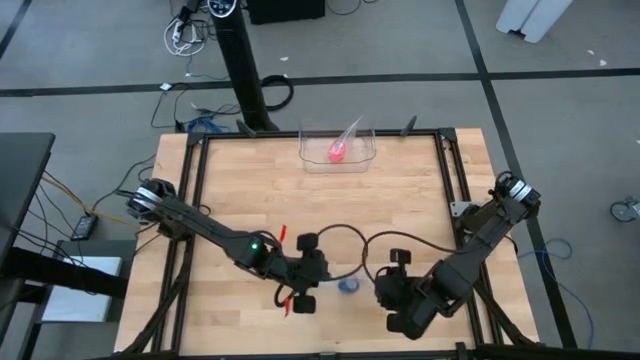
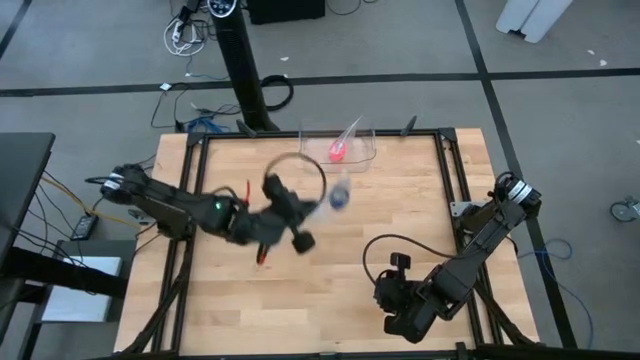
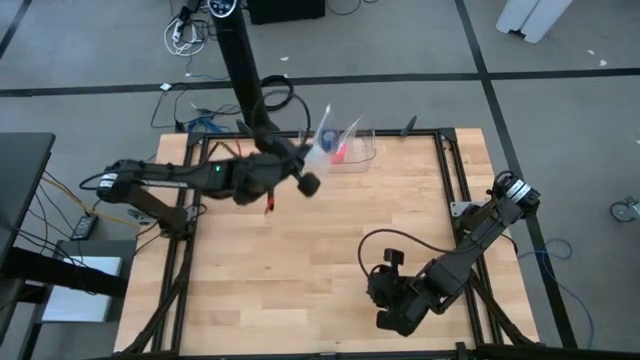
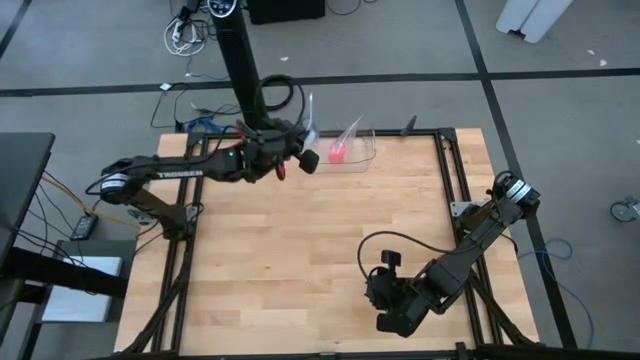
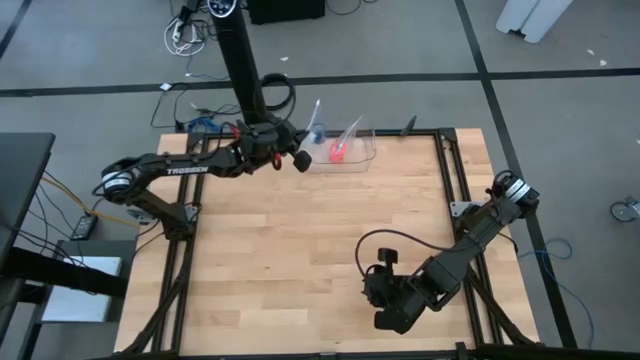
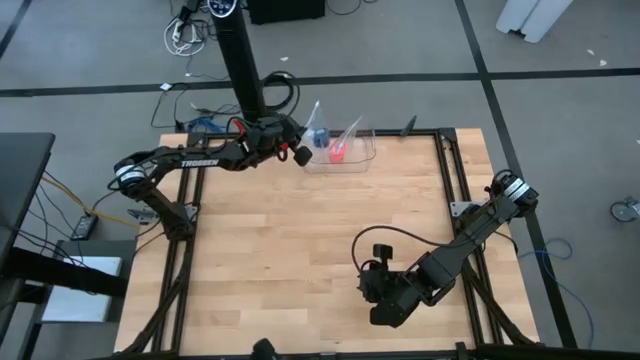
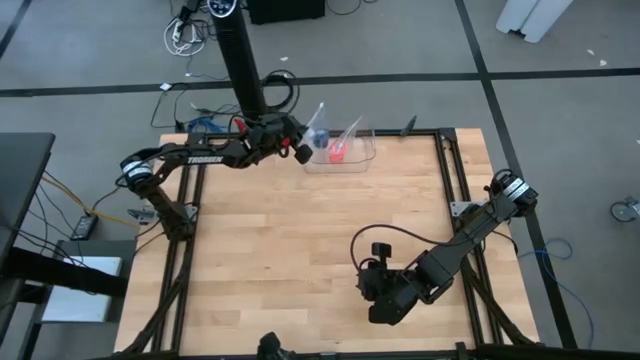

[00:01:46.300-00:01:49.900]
Task: Roll bandage
Put the transparent zip bag into the transparent bin

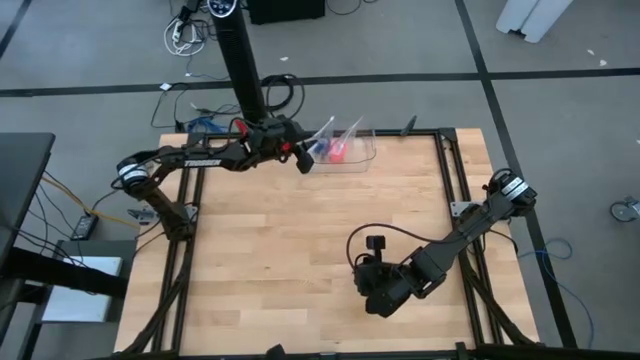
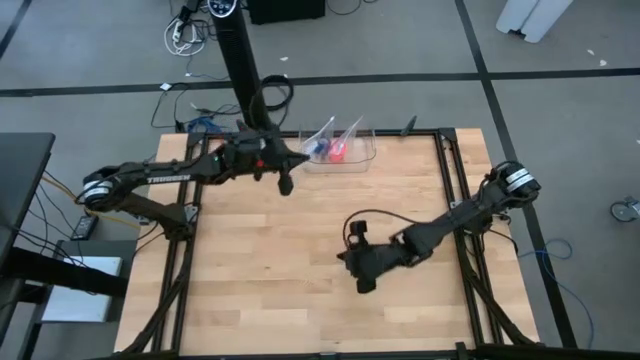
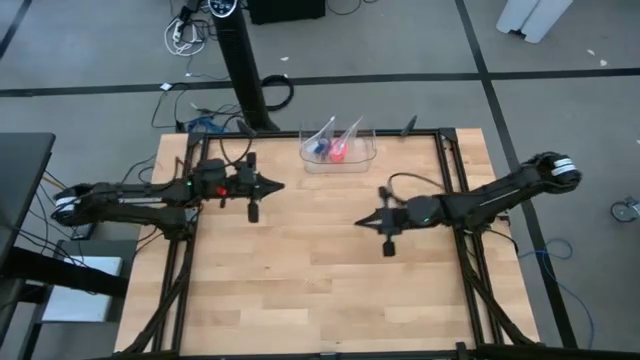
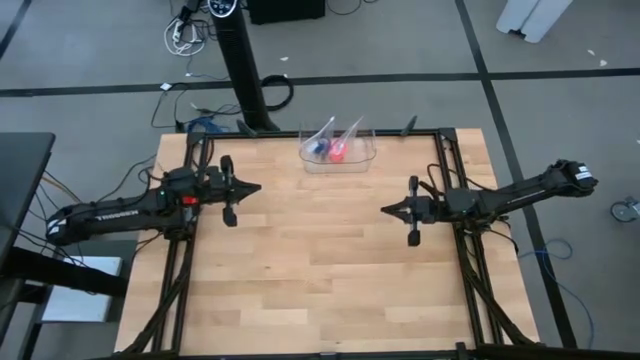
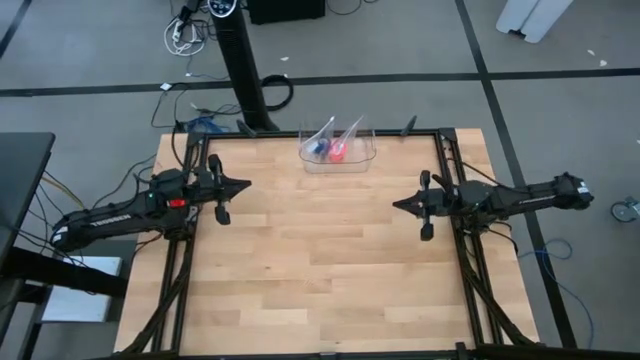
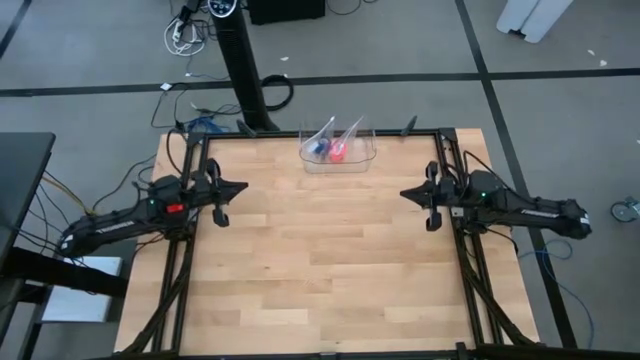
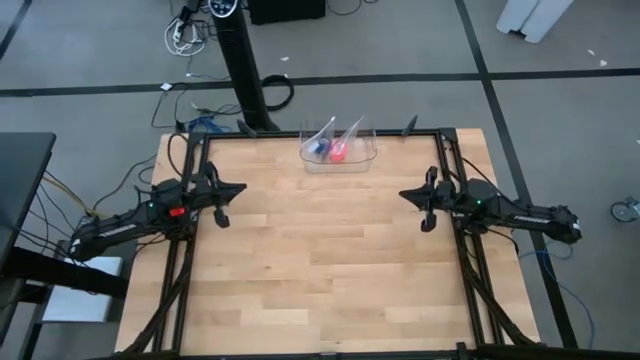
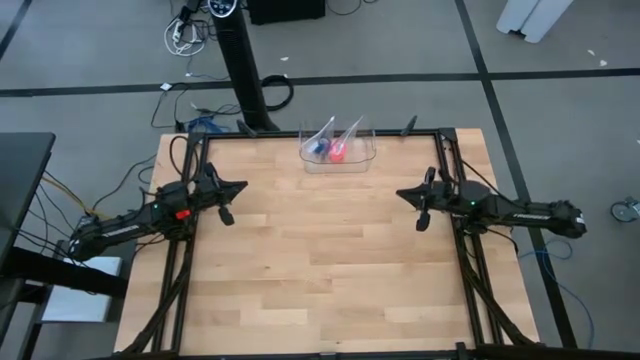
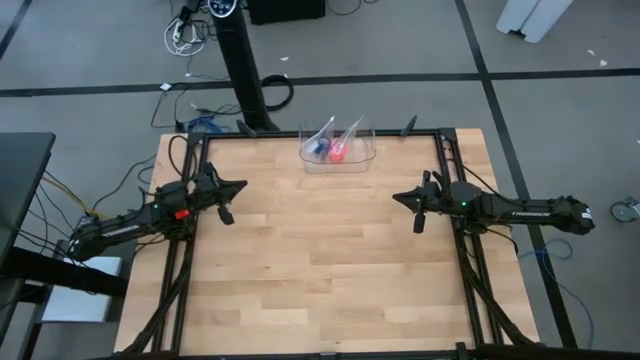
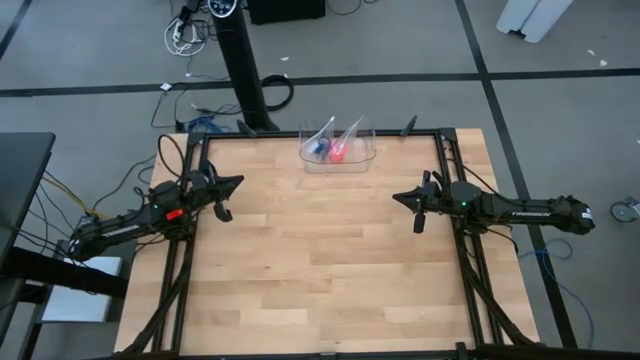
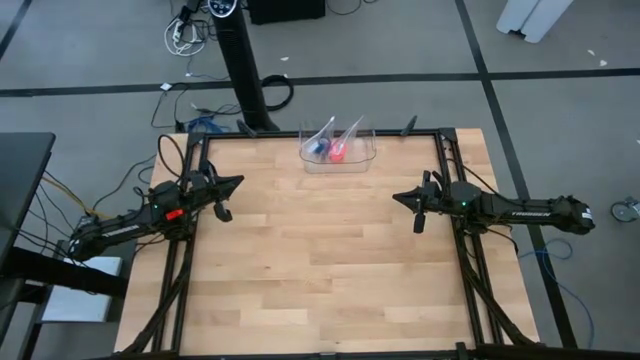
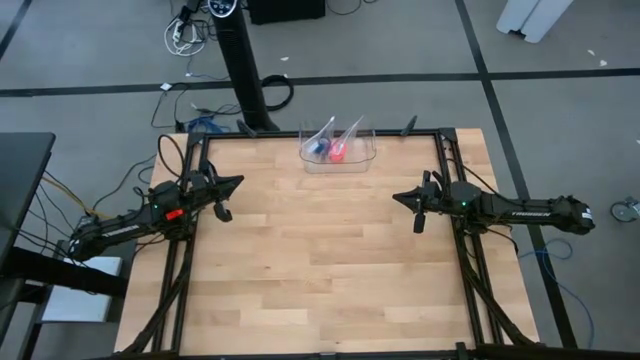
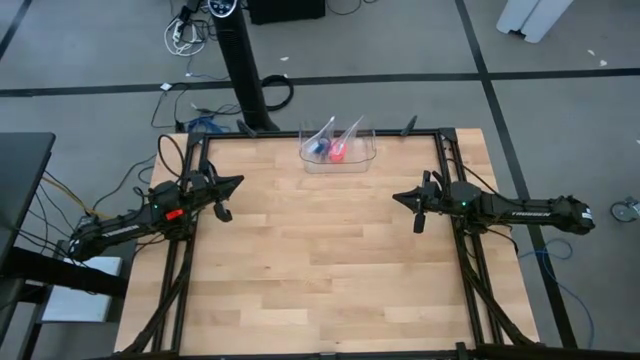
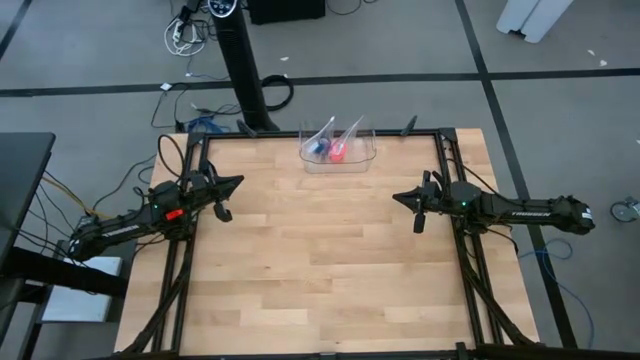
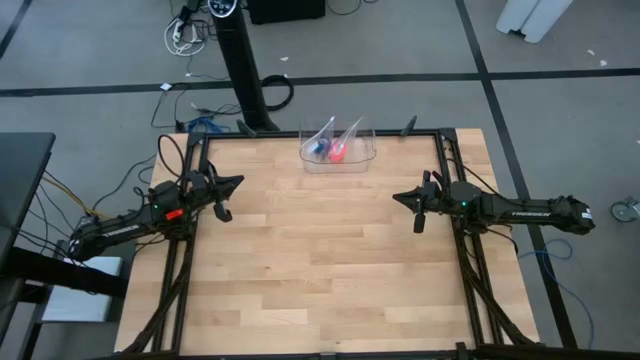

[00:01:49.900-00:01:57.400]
Return to Home Position

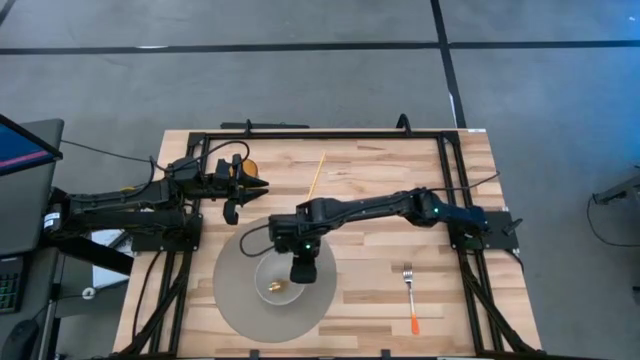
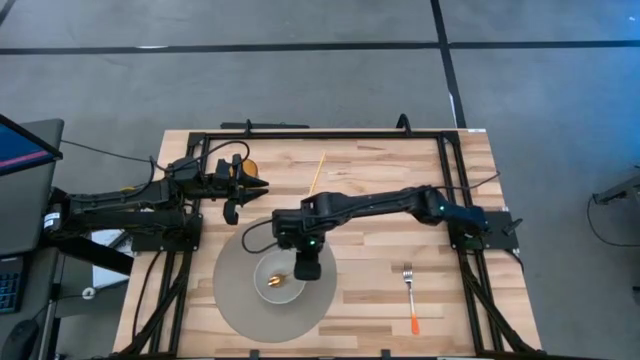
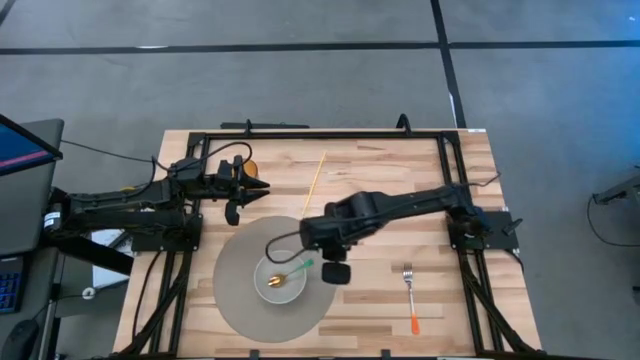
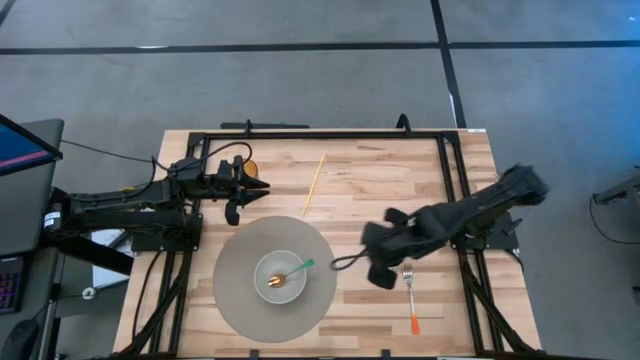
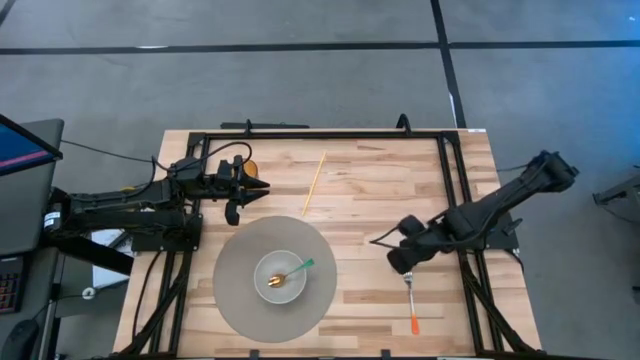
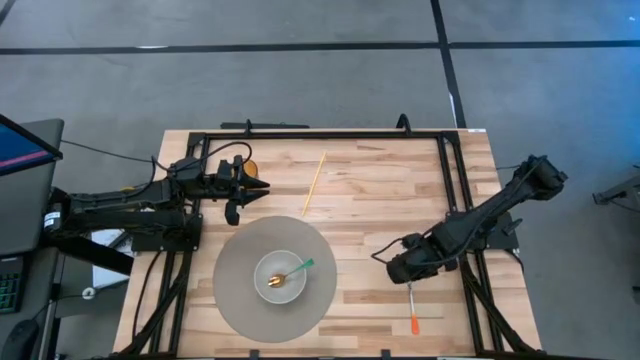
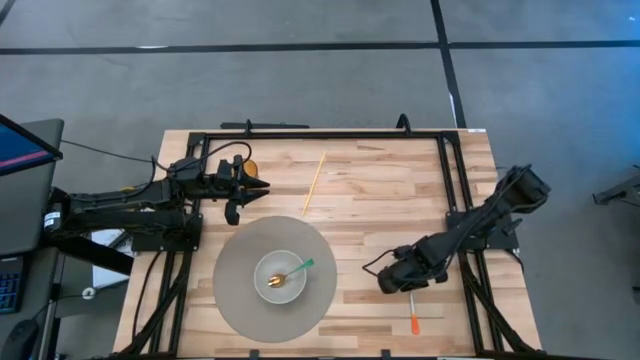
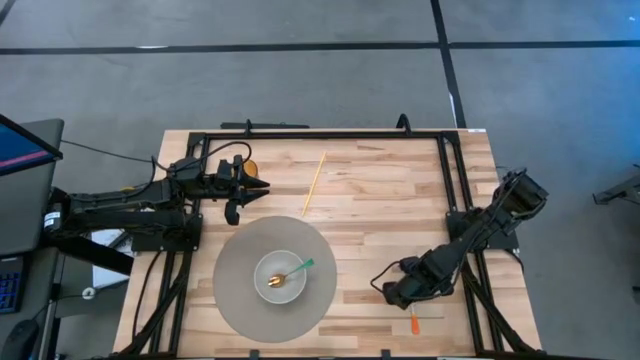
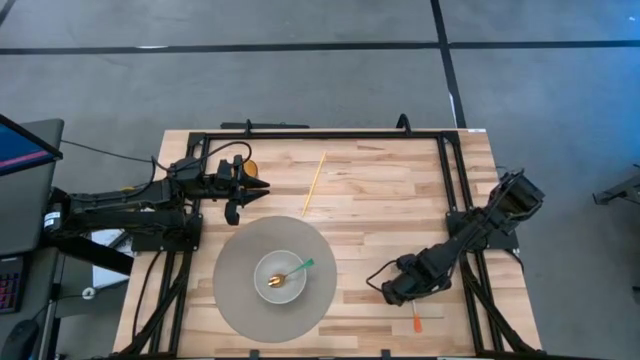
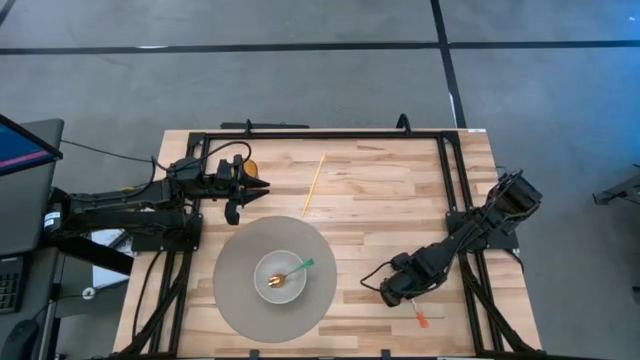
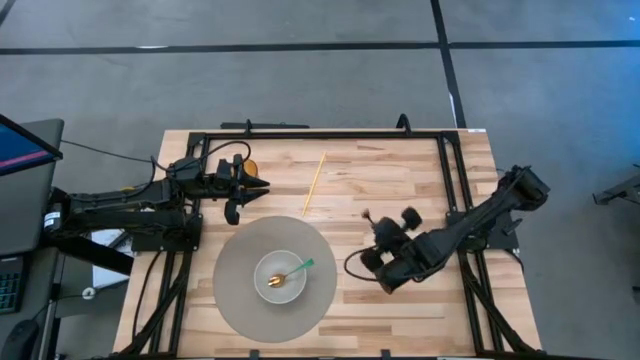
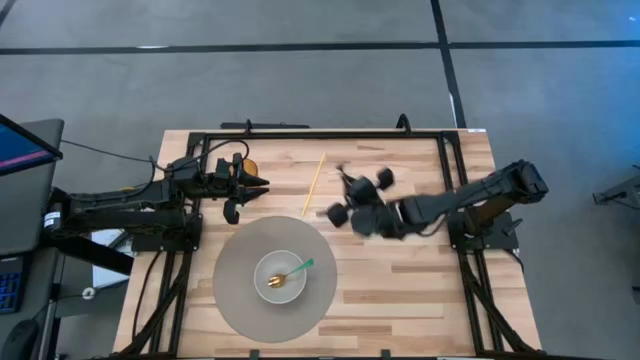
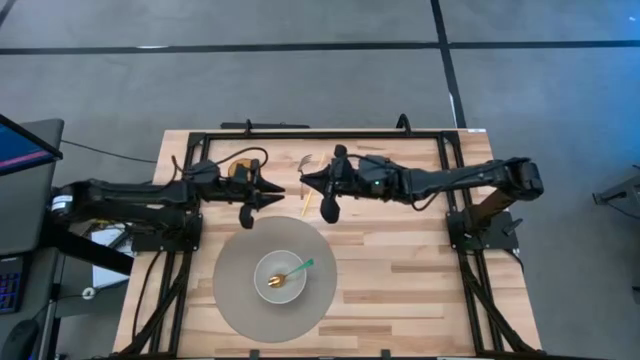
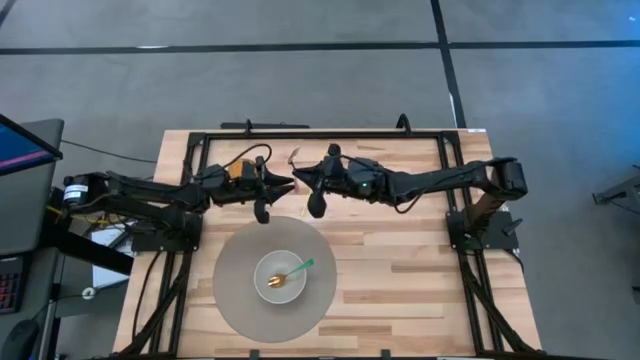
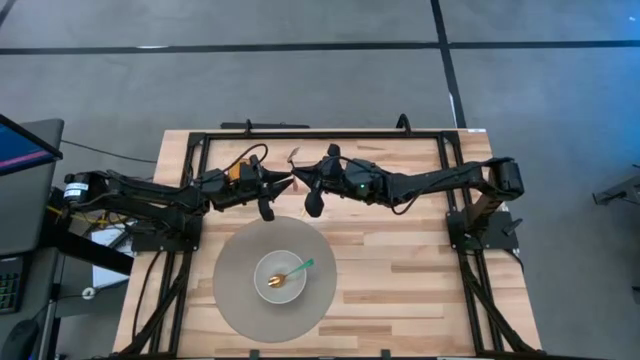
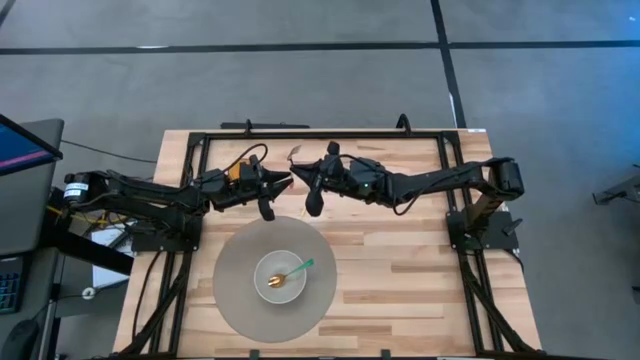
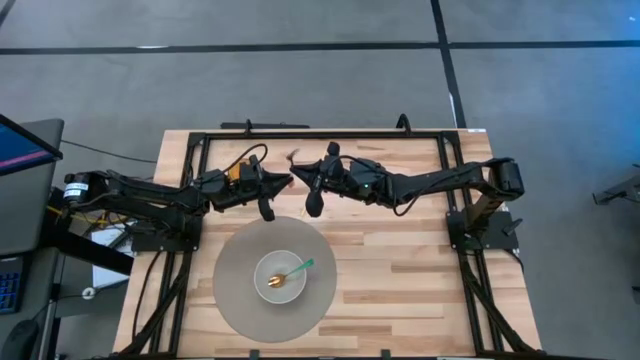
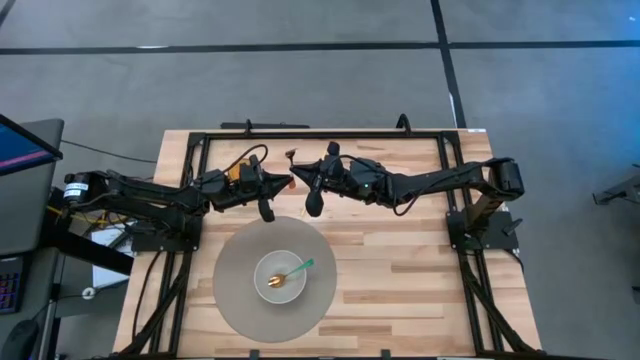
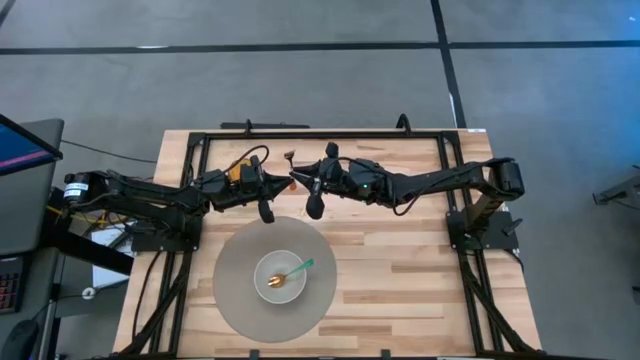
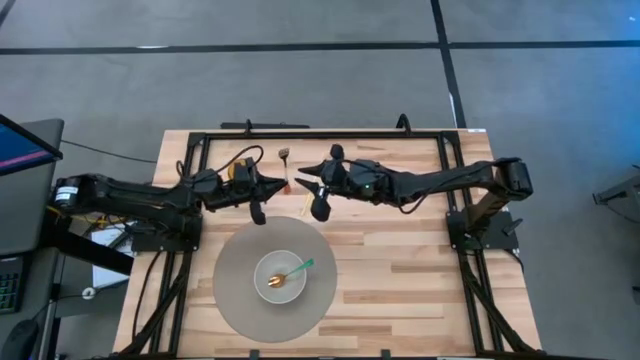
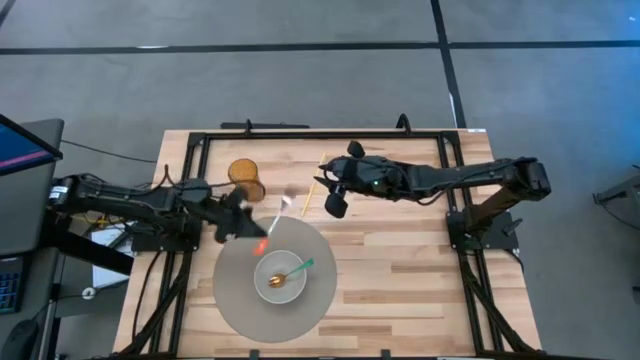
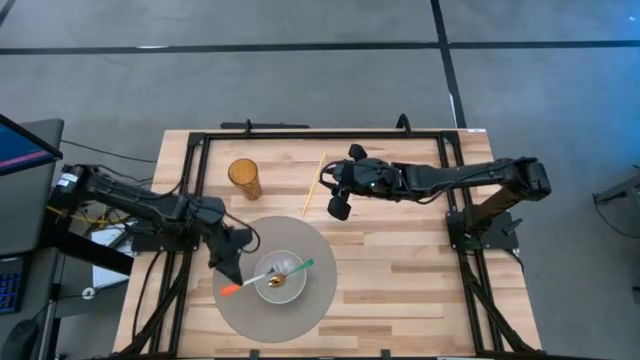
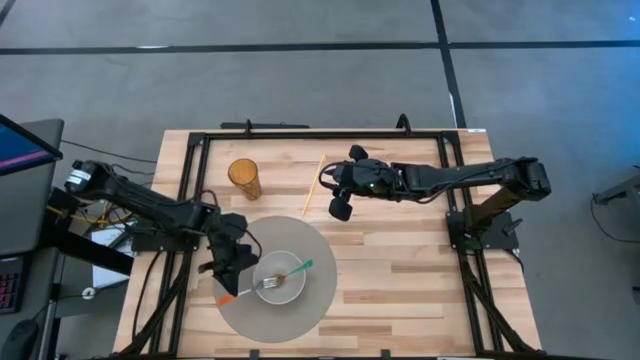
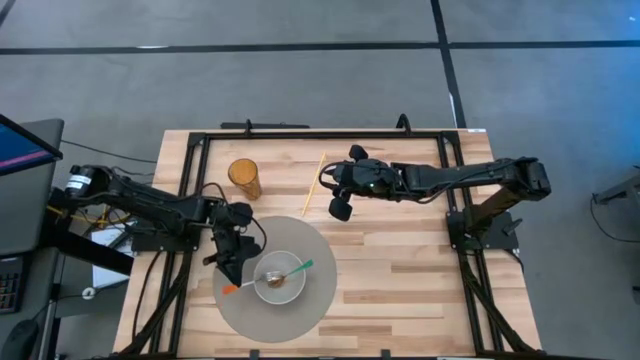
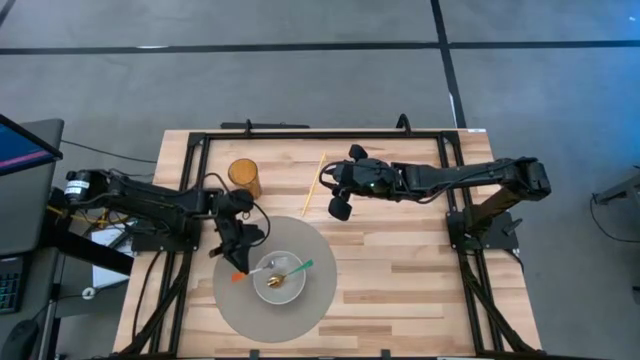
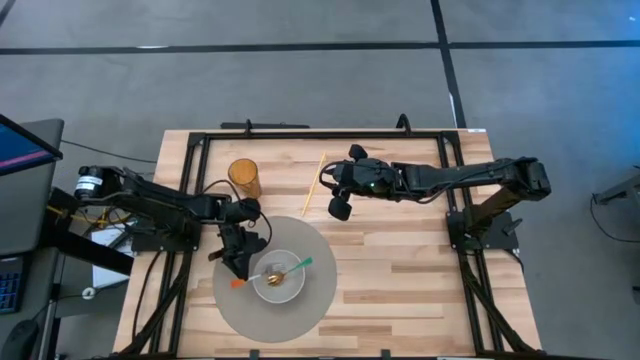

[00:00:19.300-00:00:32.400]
Task: Pick & Place Utensil
Put the orange fork into the gray bowl on the gray mat
